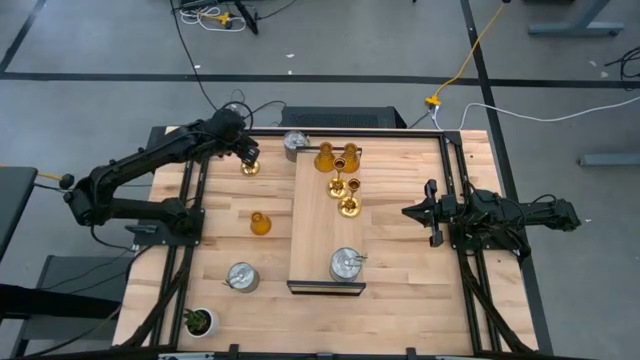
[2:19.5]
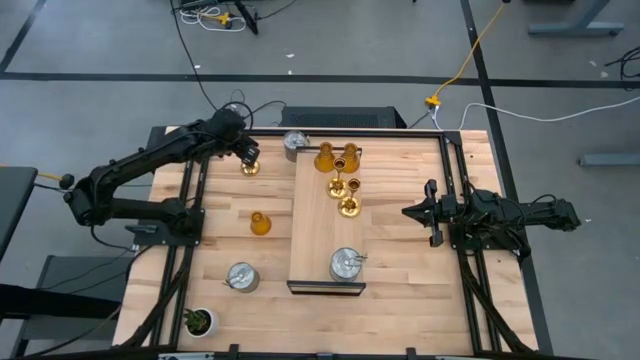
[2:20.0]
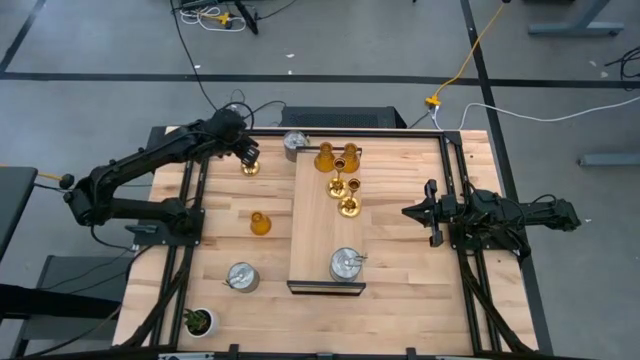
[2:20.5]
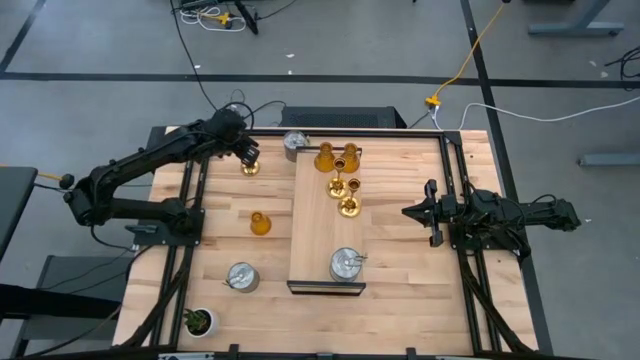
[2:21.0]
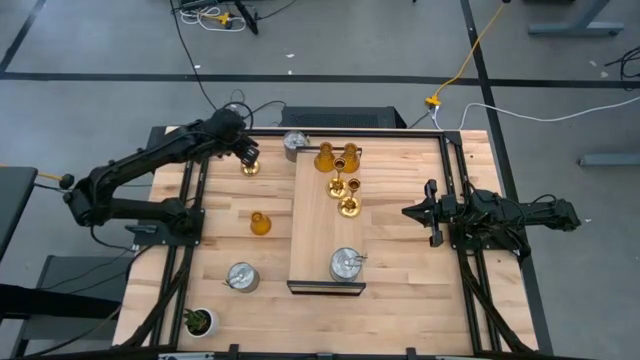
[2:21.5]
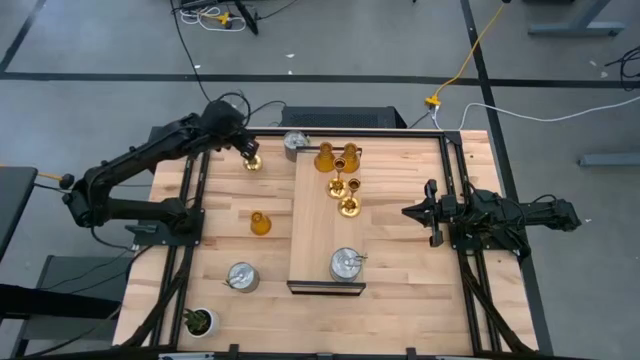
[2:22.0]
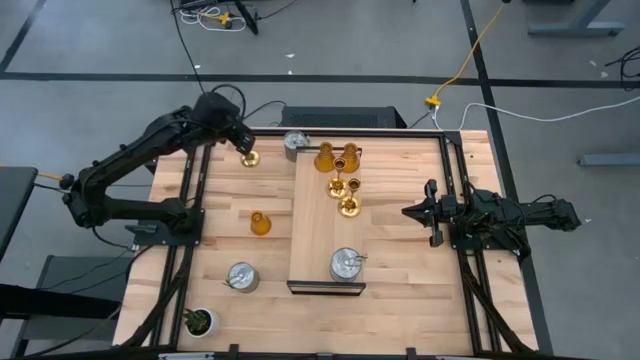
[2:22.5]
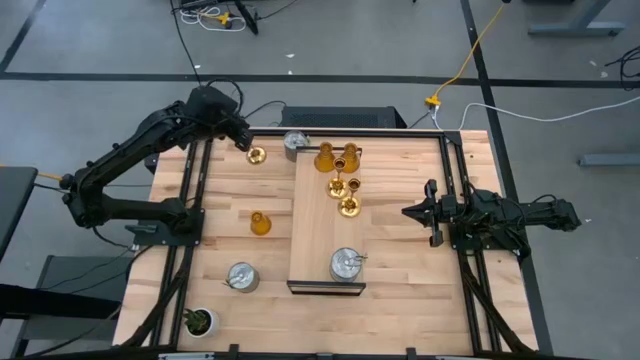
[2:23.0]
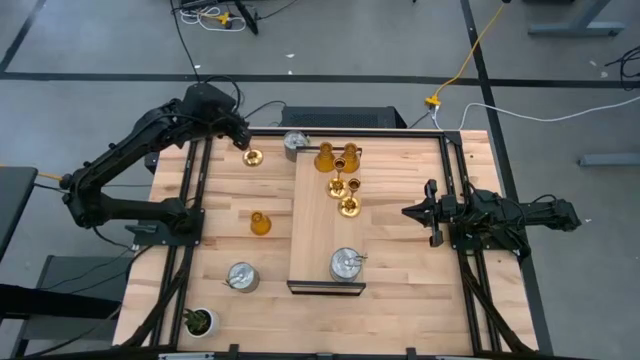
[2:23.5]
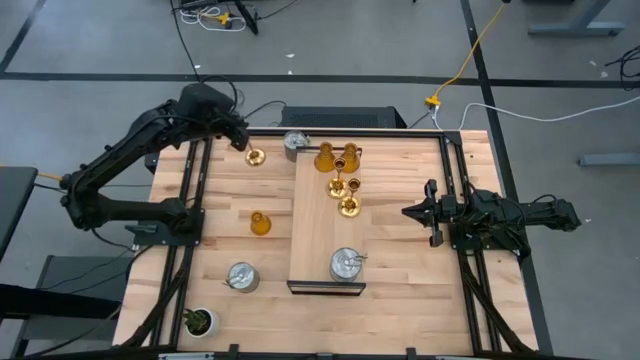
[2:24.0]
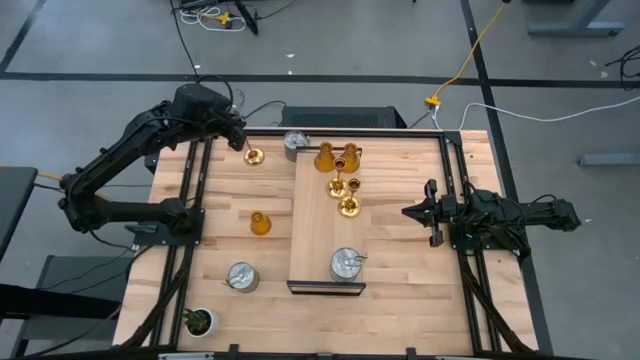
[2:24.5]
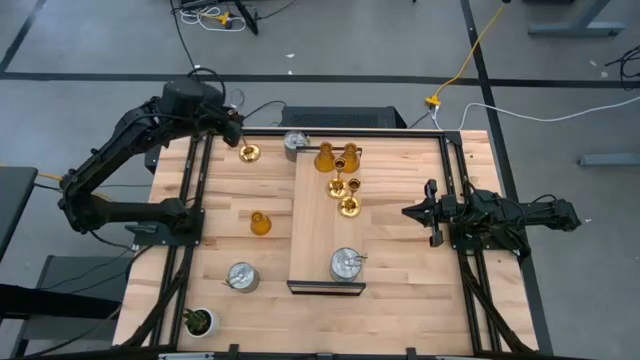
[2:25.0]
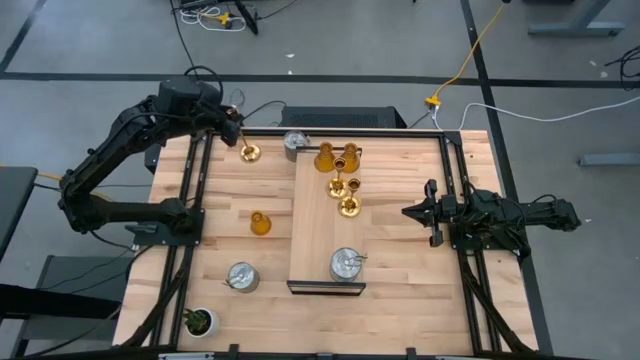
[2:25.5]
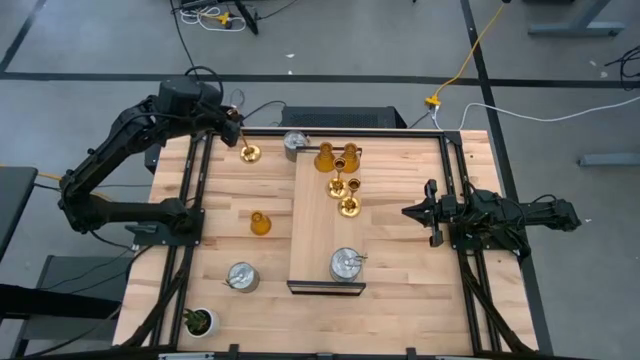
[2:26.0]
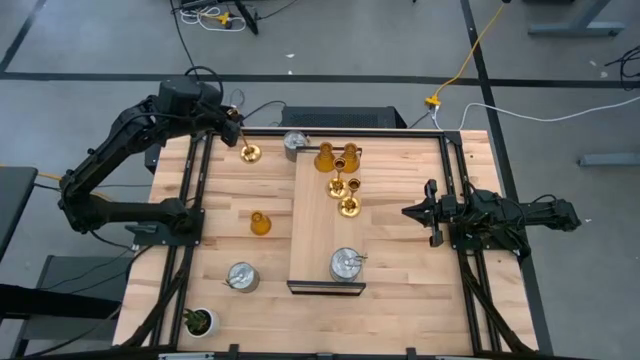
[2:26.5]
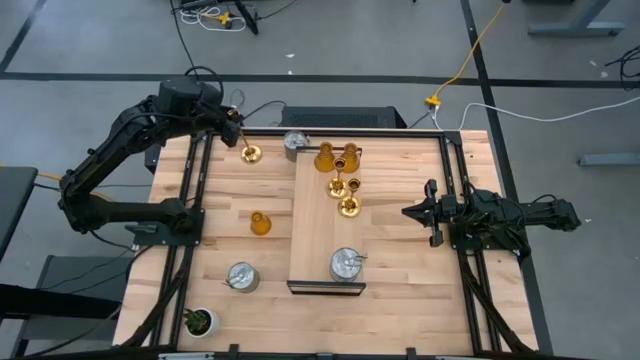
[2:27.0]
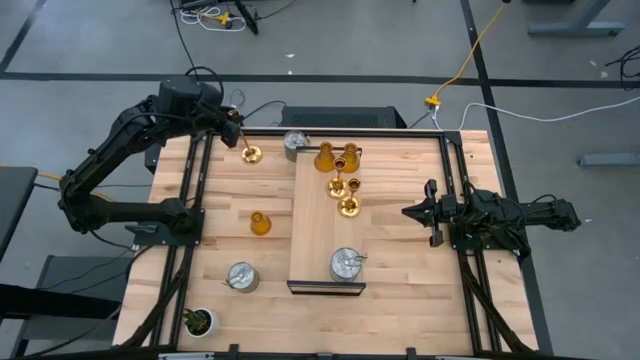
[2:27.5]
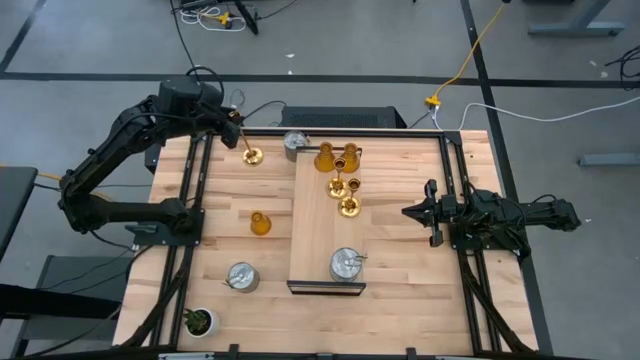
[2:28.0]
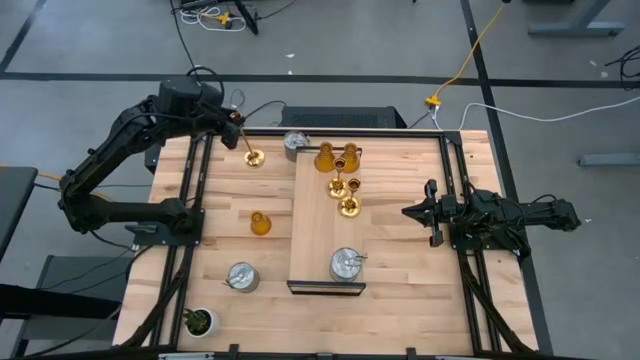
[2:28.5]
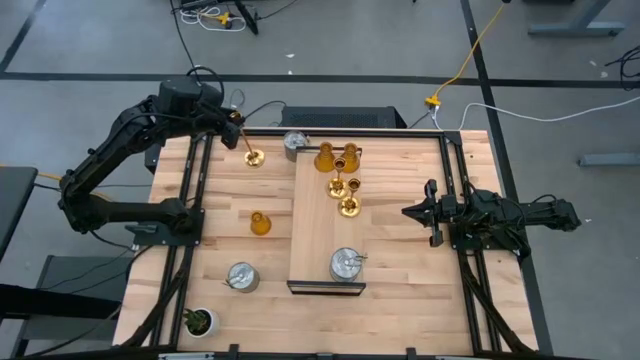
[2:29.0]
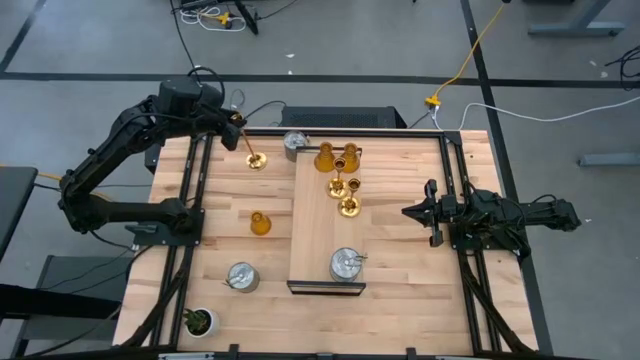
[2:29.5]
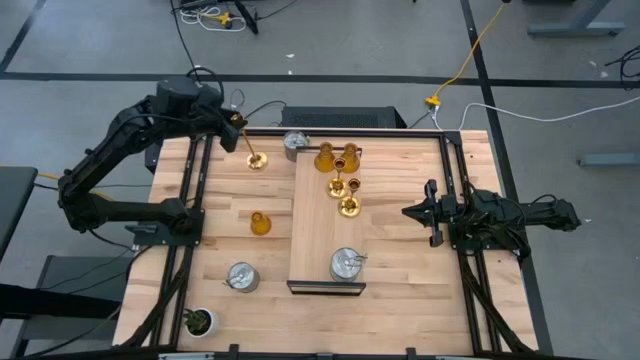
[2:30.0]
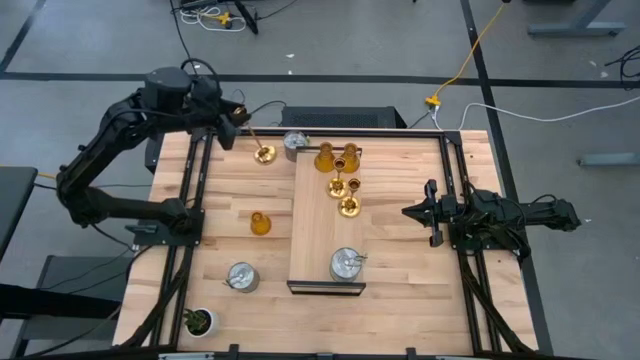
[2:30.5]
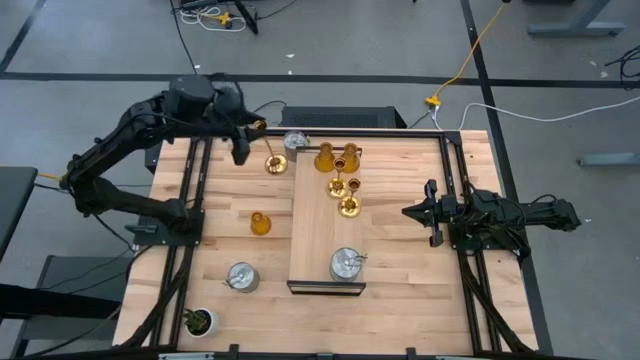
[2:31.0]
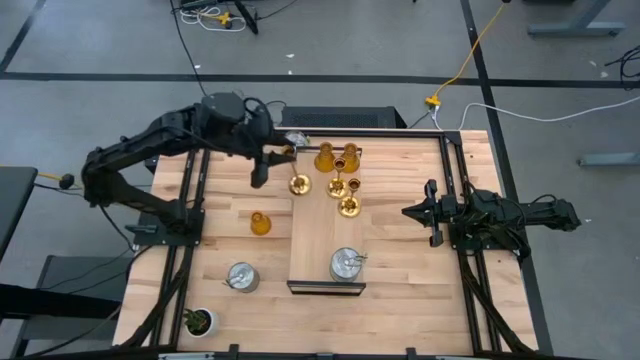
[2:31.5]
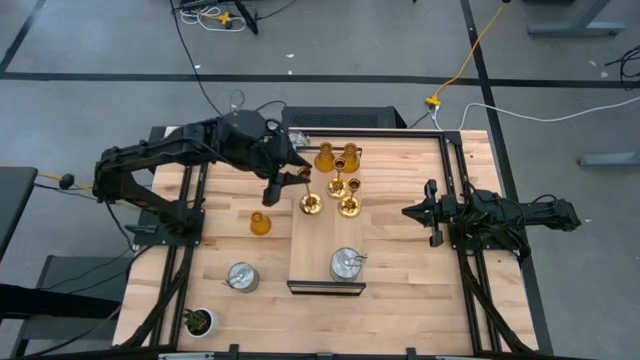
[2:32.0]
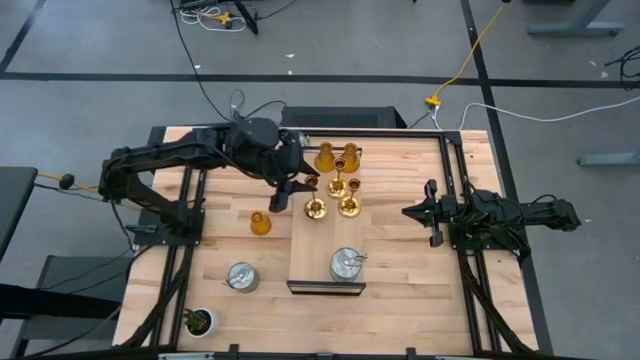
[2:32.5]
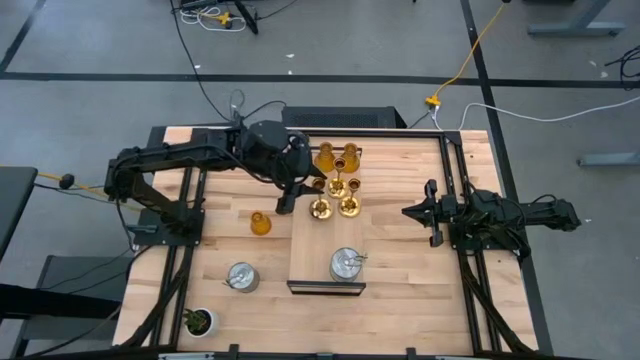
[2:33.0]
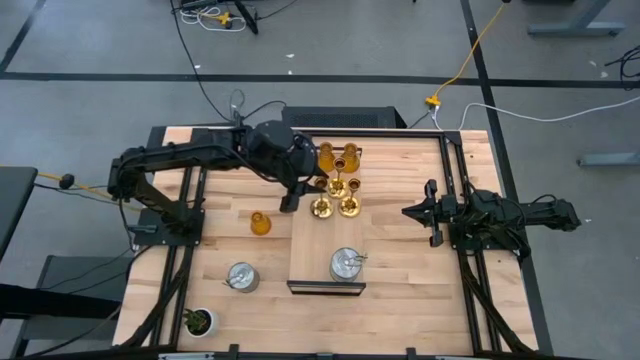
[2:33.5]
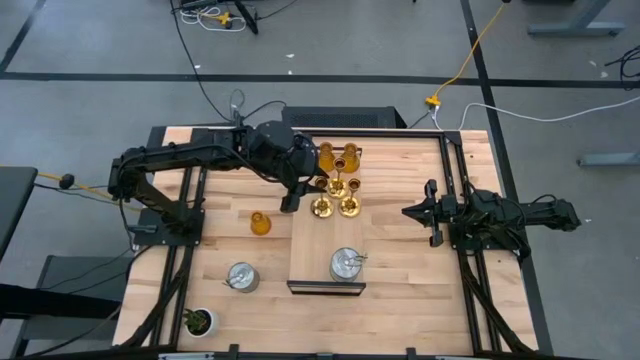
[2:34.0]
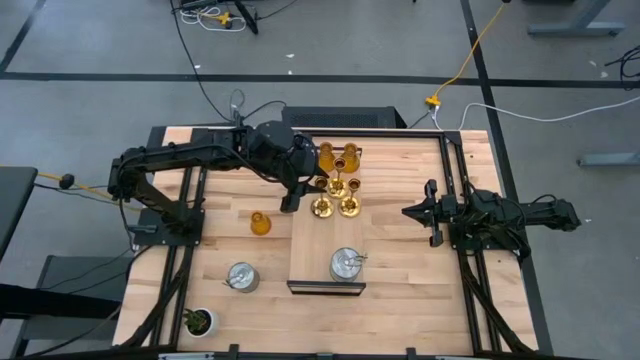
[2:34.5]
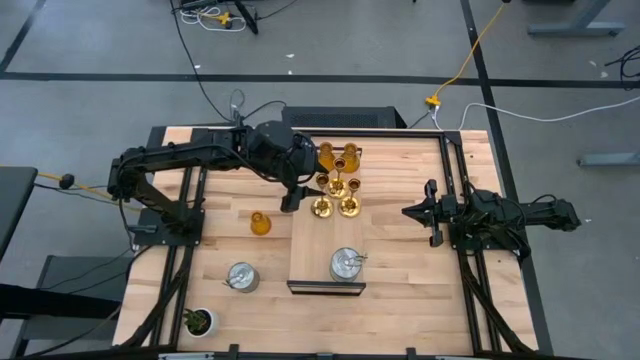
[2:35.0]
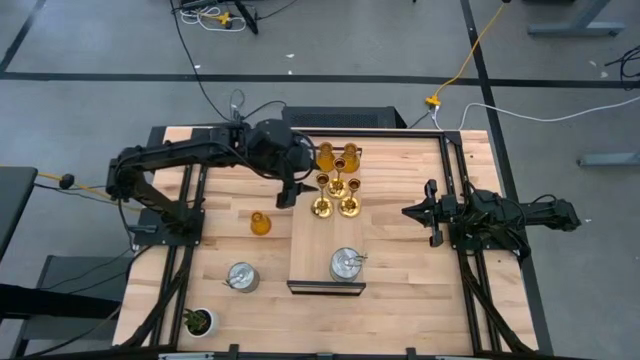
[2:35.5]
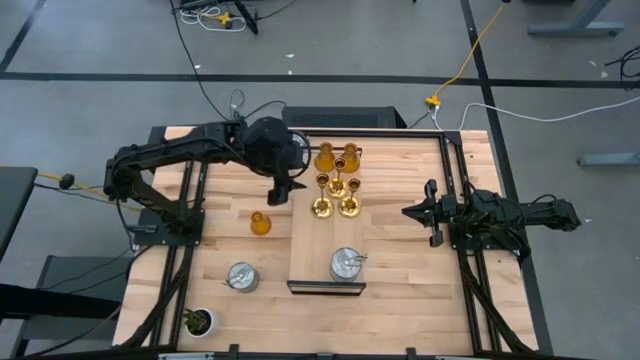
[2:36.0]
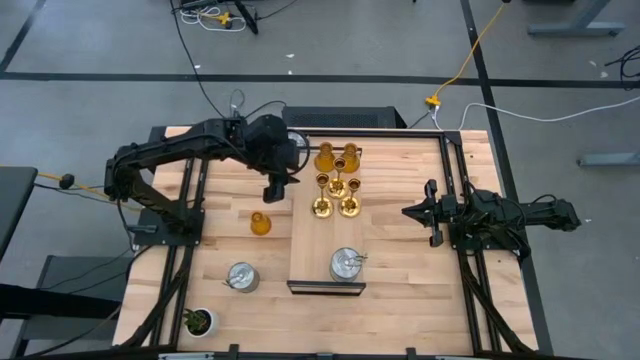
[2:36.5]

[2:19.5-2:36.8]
Task: Pick & Place candle stick holders
Put the candle holder on the shelf aligned with the other candle holder
